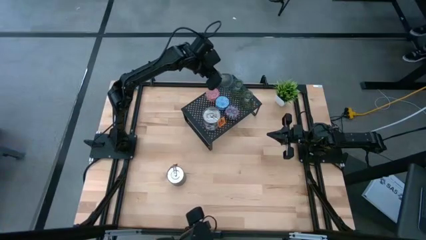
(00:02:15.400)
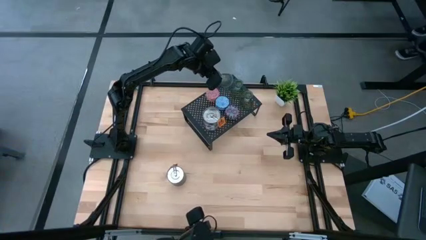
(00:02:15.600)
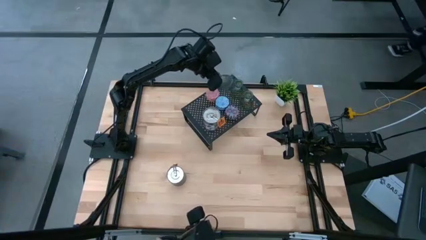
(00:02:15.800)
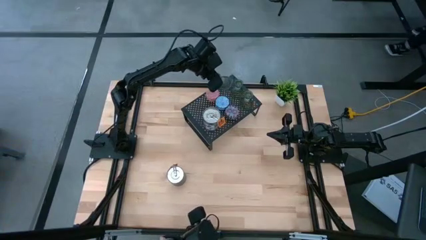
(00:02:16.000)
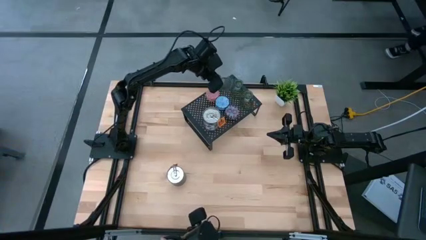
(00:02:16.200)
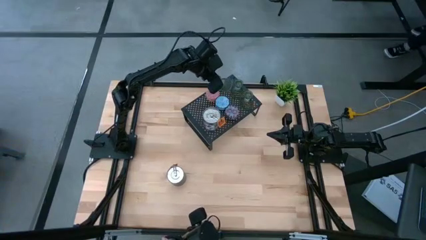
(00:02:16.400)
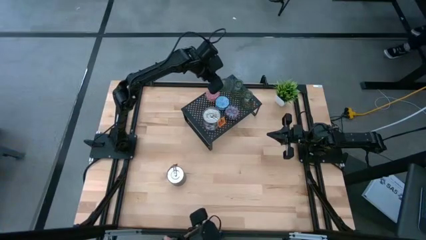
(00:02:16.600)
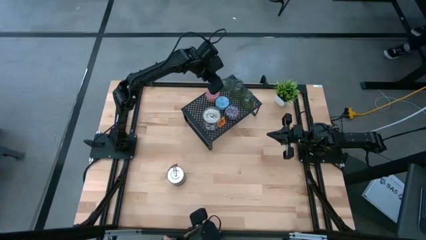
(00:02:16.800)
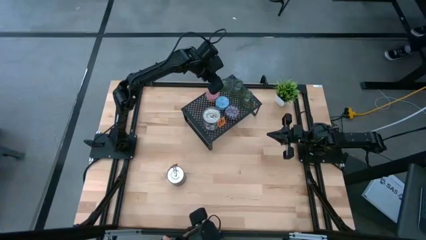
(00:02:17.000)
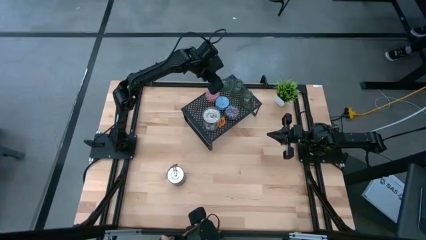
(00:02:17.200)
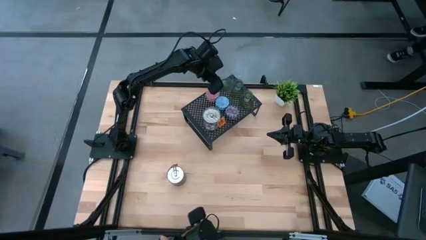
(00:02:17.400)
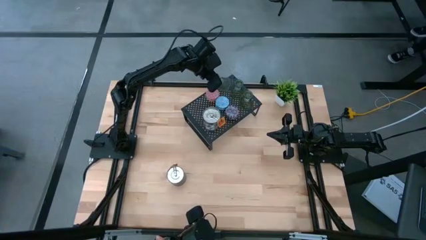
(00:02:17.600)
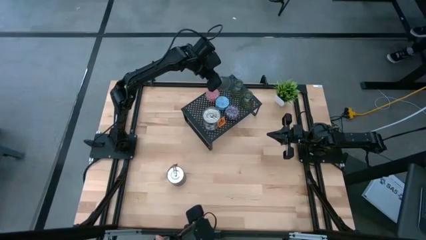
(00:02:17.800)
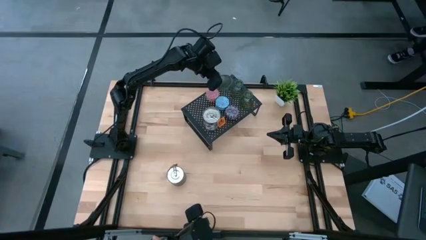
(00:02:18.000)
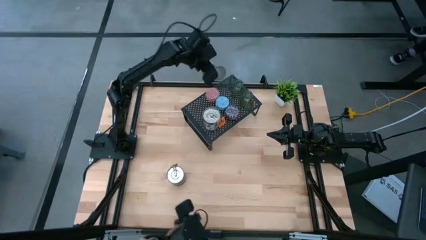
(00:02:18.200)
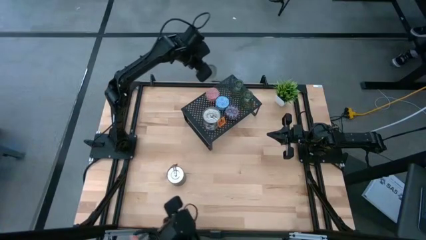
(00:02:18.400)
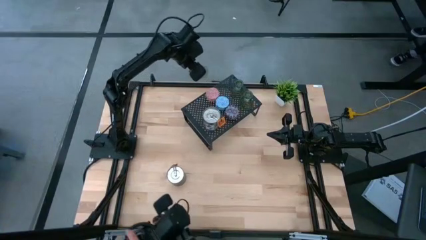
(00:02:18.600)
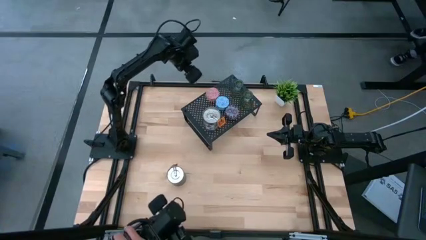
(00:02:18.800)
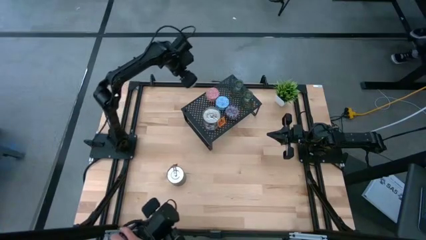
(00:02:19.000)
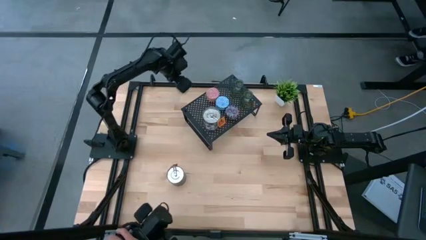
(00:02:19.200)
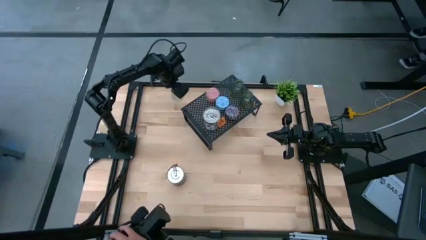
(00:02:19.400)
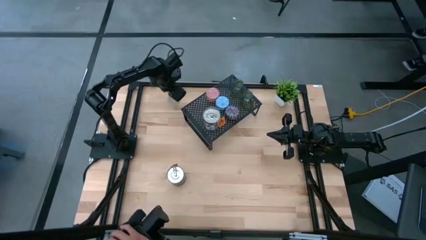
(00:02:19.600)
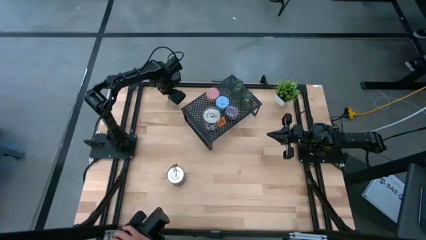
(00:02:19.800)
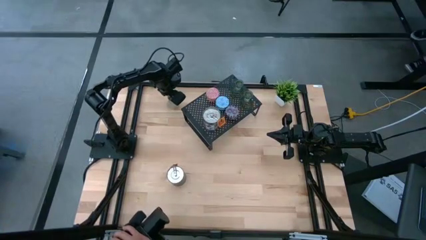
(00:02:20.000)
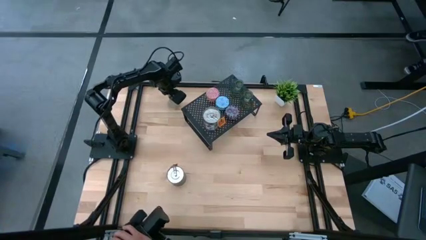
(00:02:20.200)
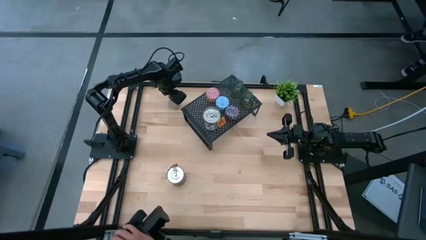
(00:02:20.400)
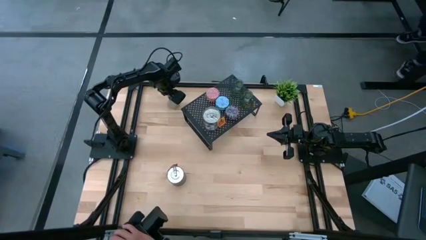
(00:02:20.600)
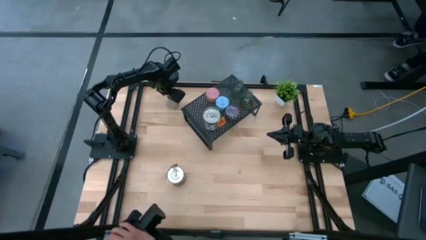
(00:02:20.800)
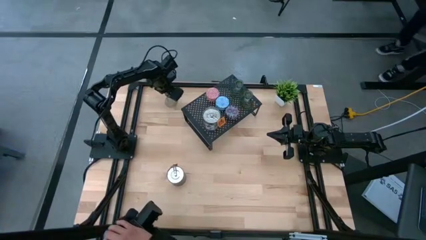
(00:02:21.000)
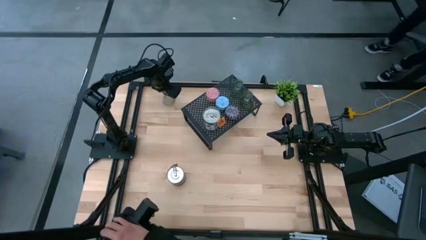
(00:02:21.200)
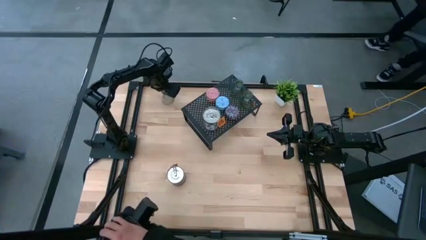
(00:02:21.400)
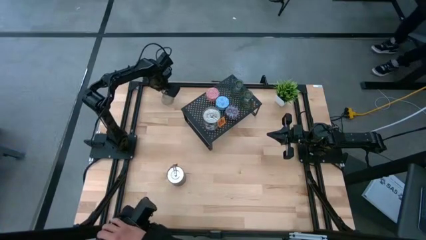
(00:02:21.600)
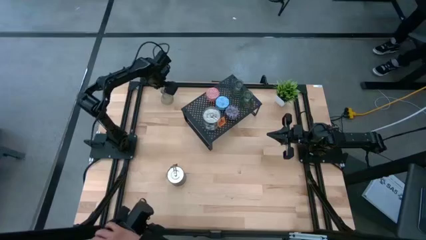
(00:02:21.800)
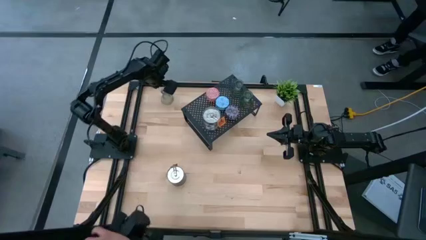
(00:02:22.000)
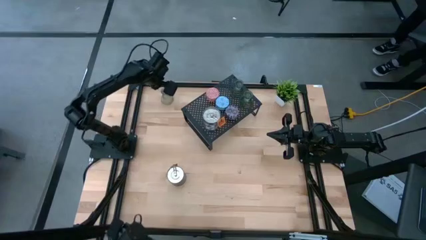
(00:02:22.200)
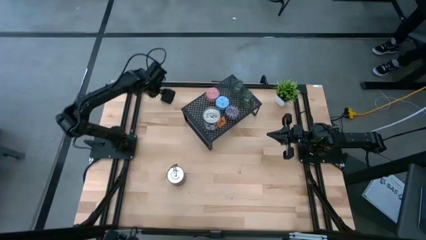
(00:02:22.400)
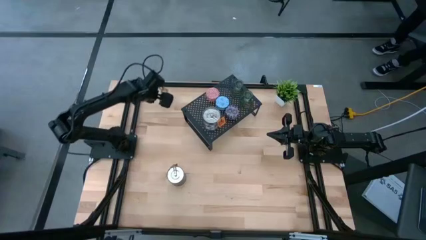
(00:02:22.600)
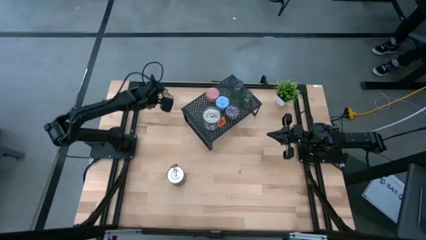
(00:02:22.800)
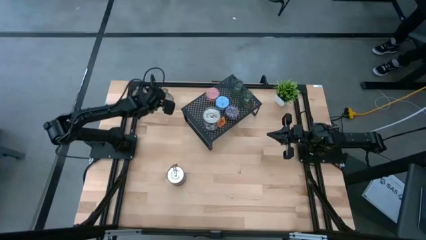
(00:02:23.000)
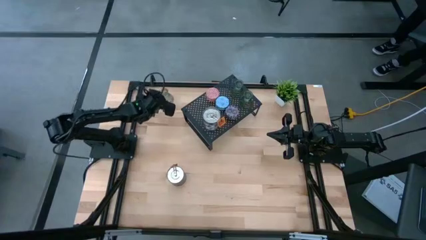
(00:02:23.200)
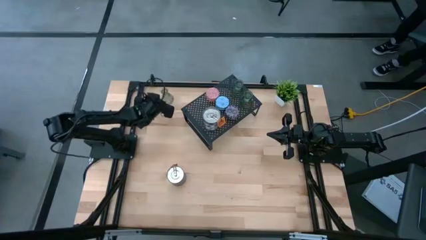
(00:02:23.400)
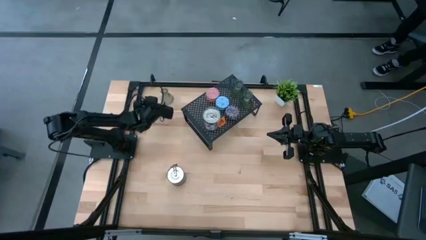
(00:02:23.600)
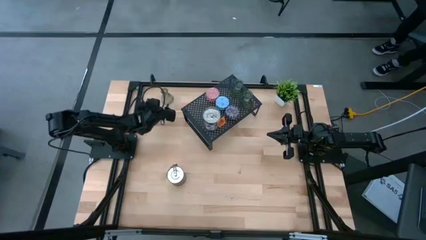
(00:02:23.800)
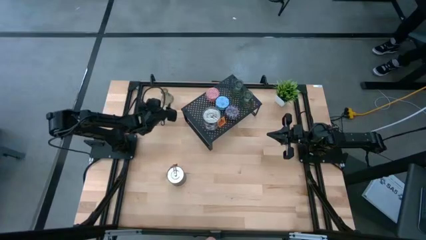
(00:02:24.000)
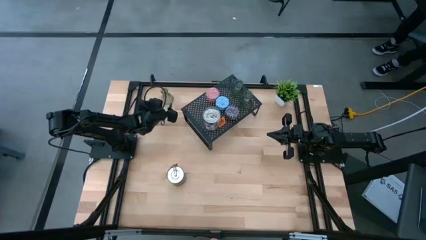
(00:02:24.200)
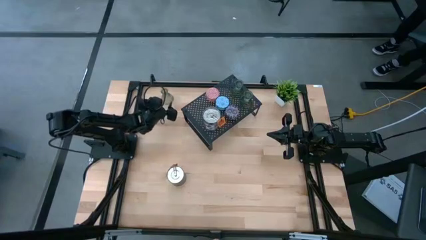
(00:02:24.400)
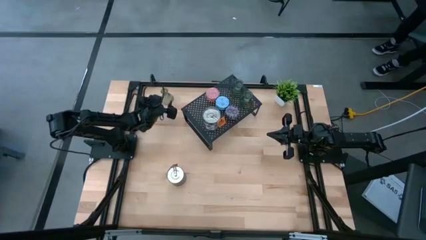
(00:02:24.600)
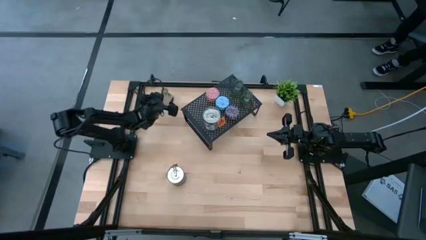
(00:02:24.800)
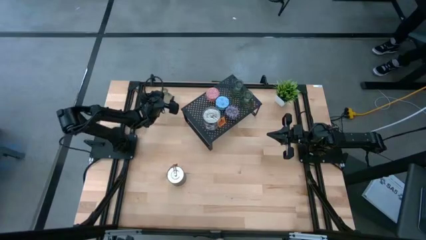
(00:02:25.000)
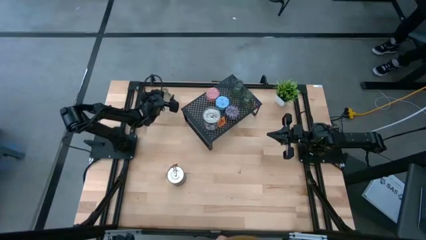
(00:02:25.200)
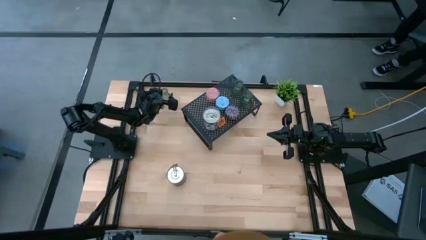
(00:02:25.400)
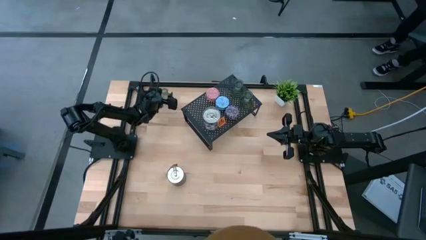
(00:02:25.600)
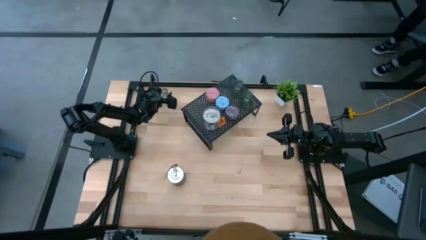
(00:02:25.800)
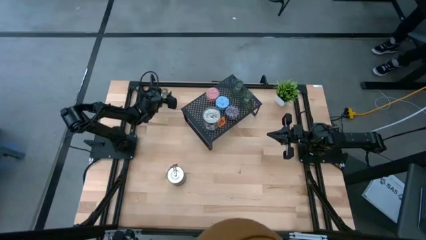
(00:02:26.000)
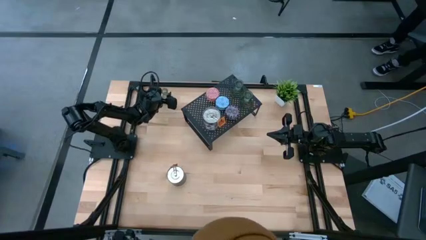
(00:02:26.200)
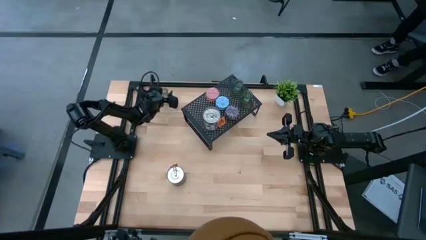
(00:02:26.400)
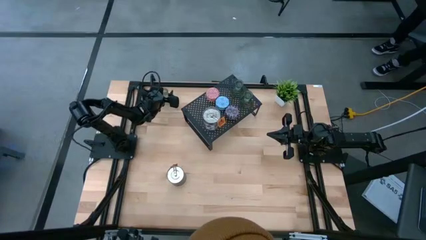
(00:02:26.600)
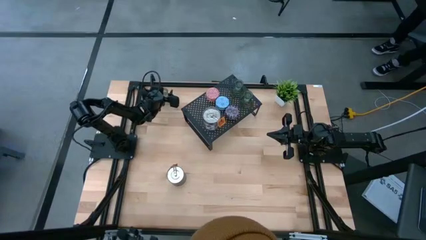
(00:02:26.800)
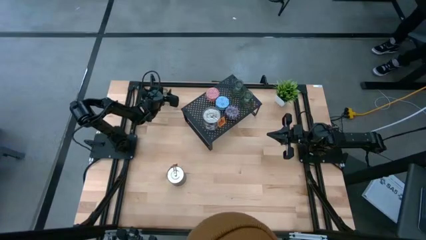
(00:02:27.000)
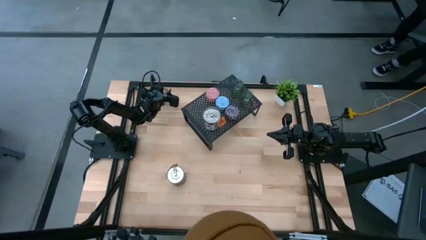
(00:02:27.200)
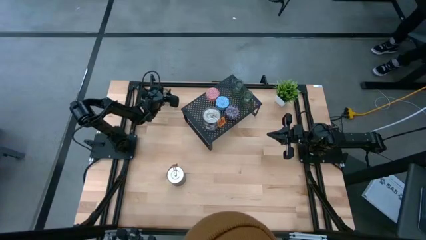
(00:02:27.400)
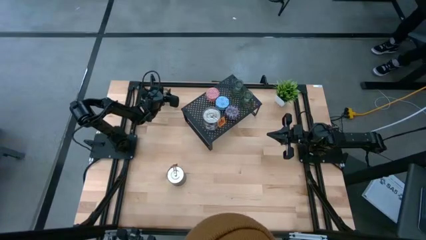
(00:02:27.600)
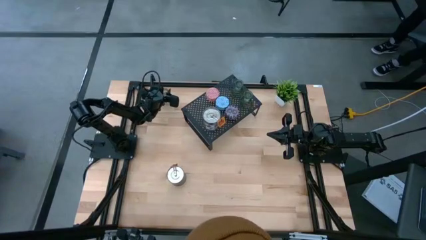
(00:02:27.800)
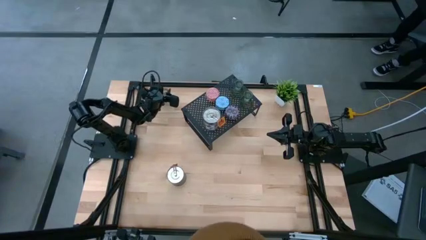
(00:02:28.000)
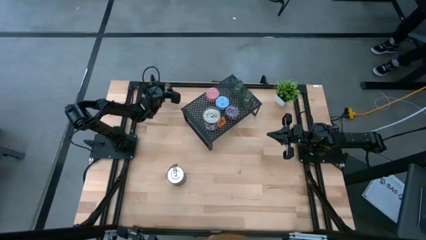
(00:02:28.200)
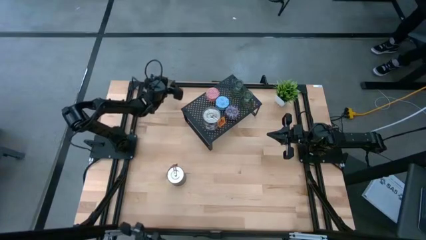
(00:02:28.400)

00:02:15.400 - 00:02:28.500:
Task: Pick & Place candle stick holders
Put the green glass candle holder on the shelf aligned with the green glass candle holders
